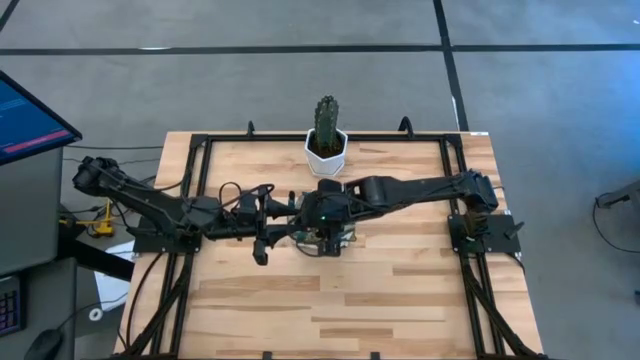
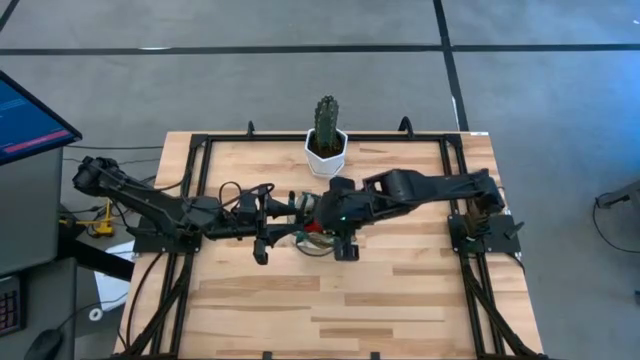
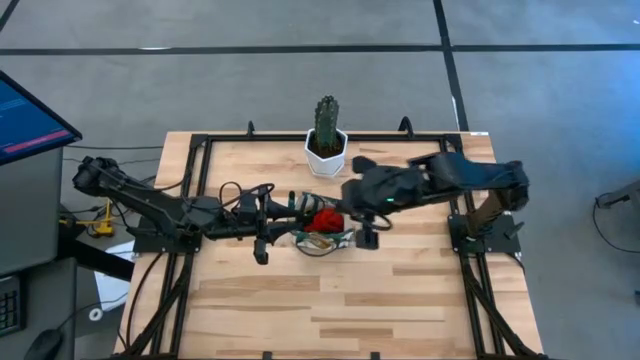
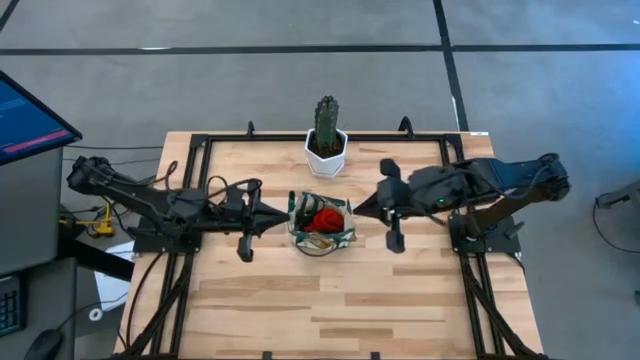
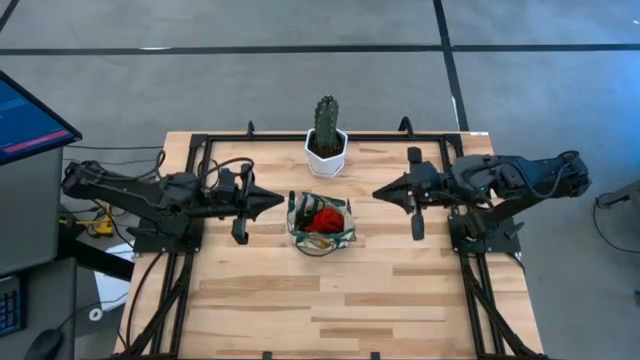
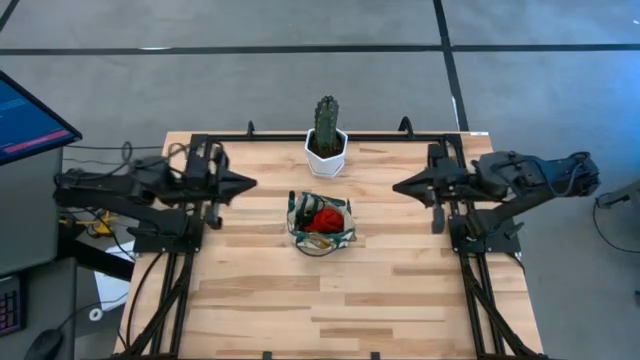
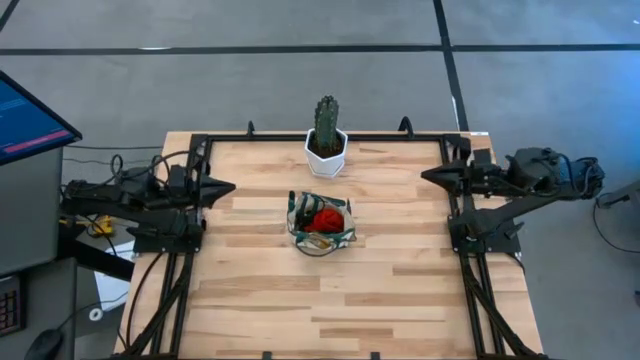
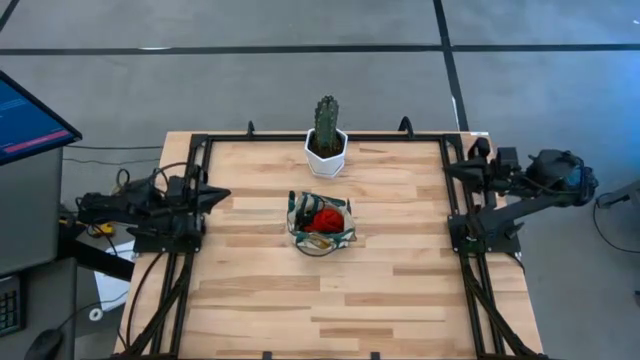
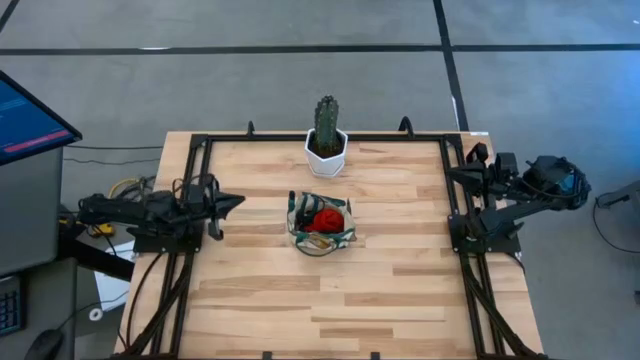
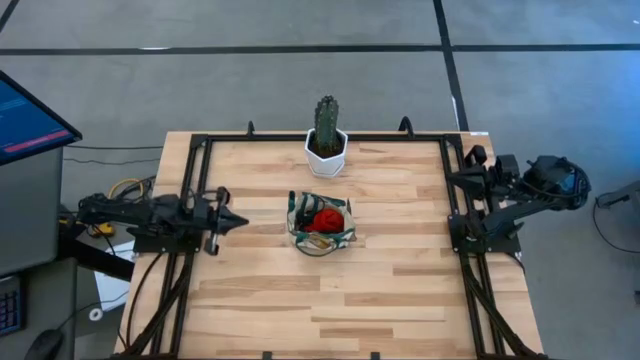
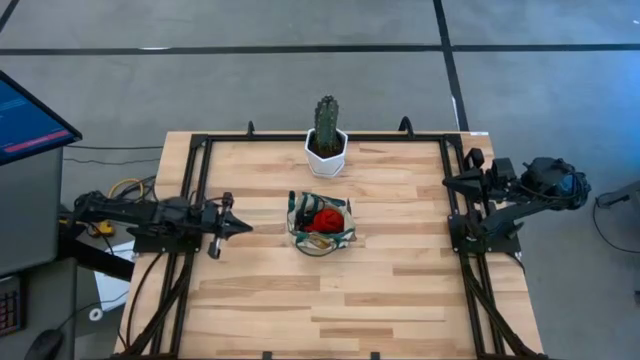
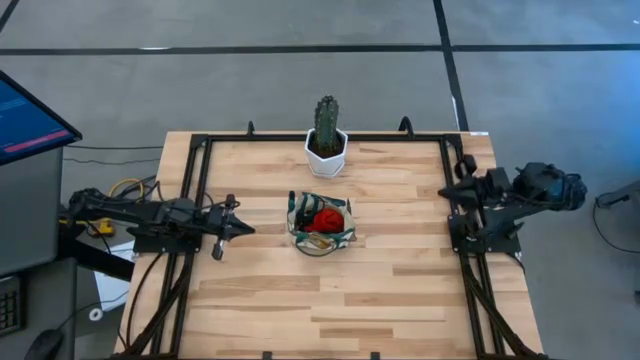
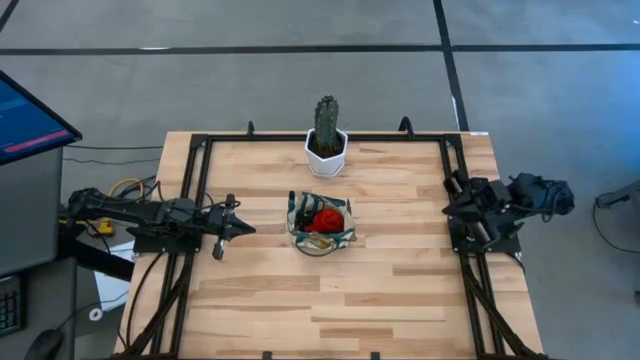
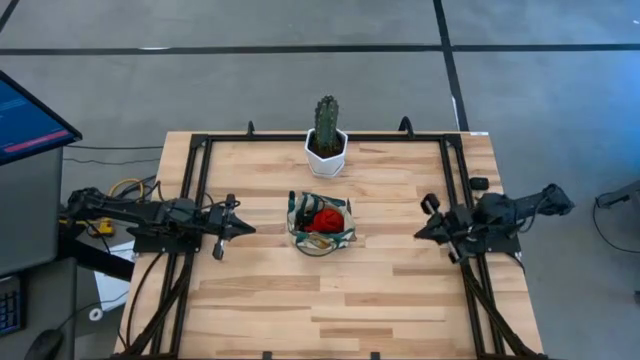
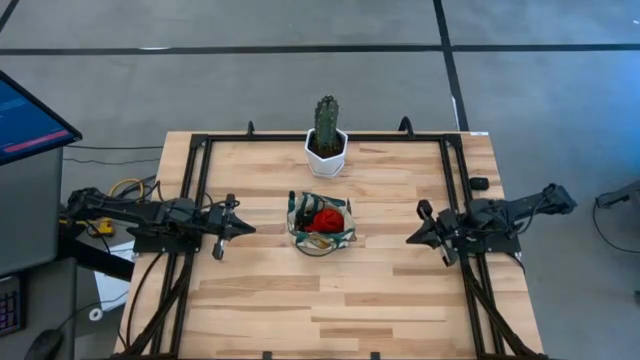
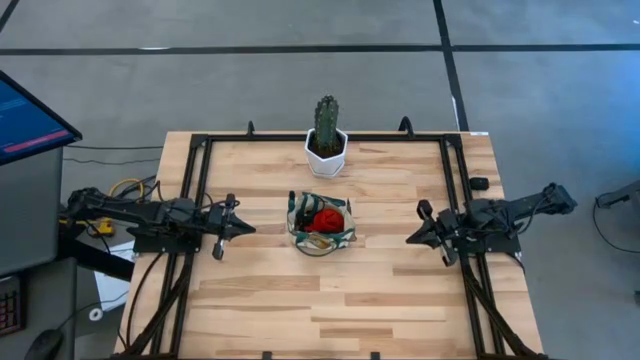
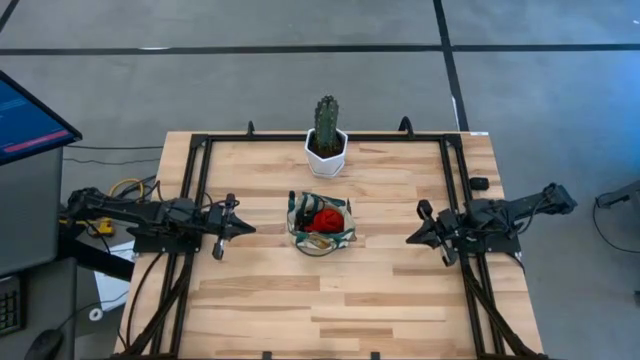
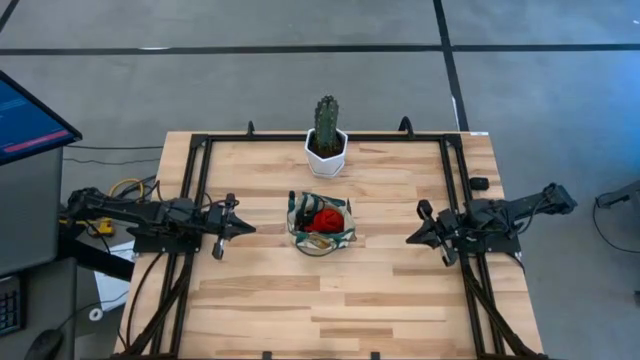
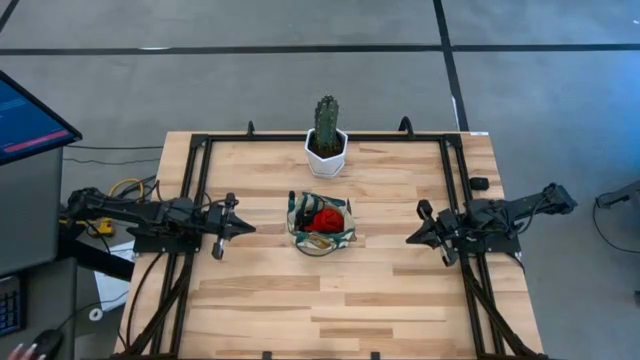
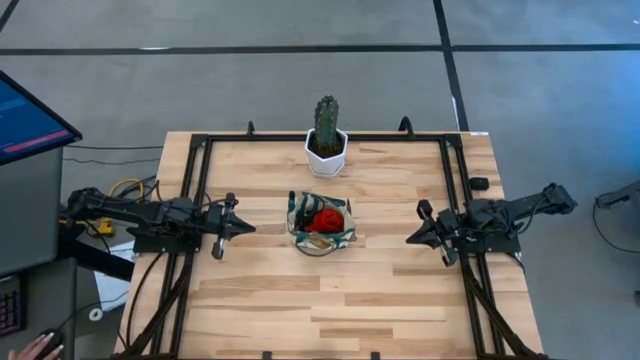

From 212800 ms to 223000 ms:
Task: Pick & Place Garden tools in Gardening bag
Return to Home Position

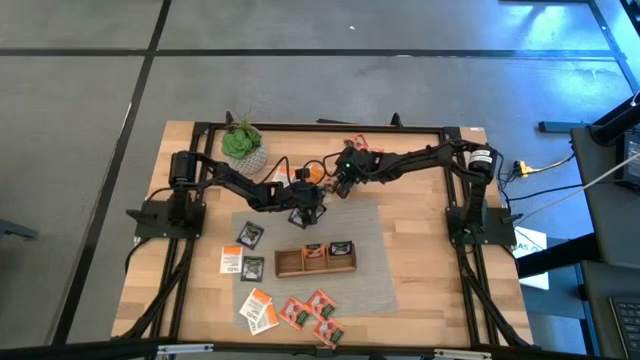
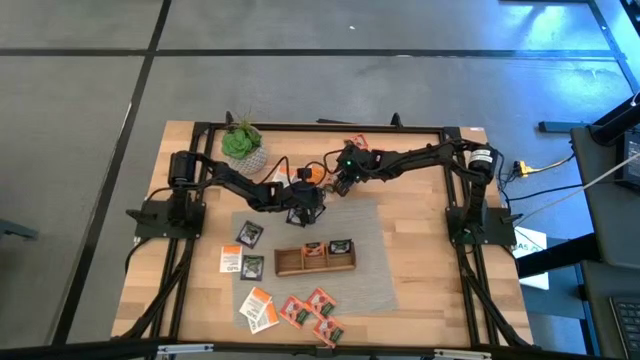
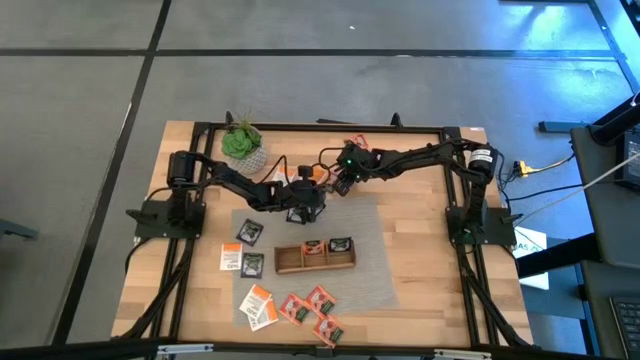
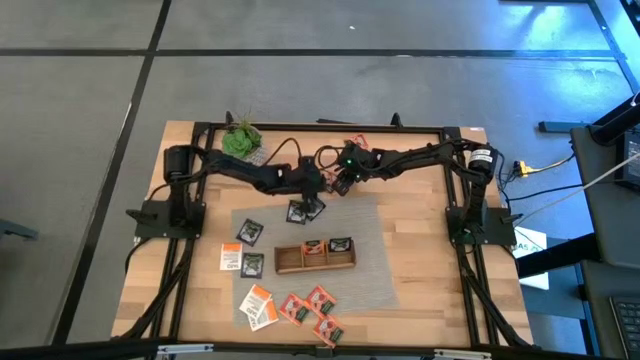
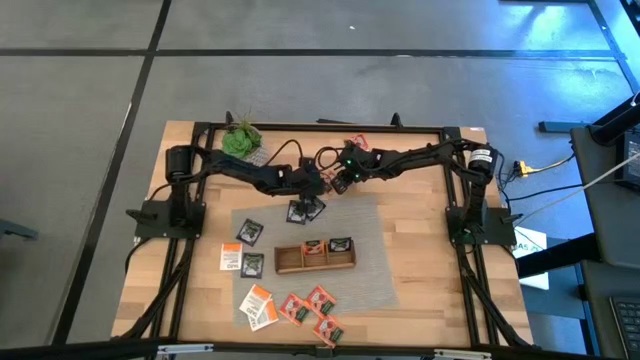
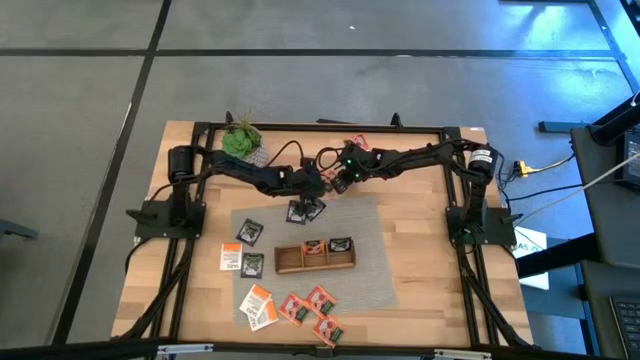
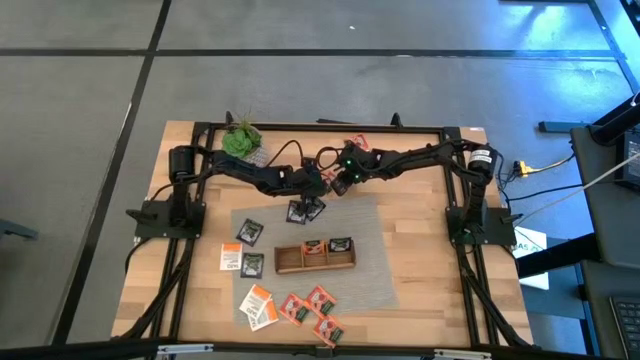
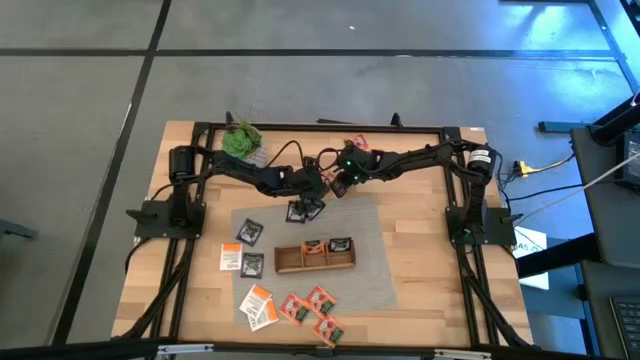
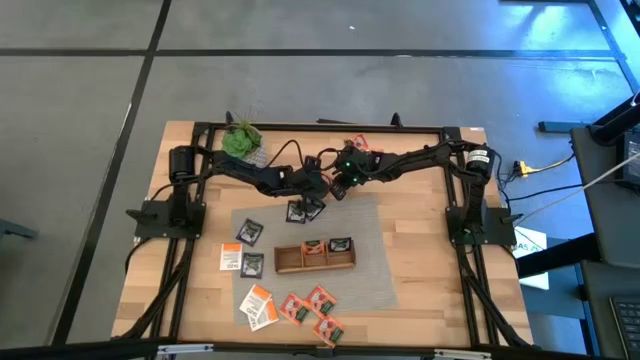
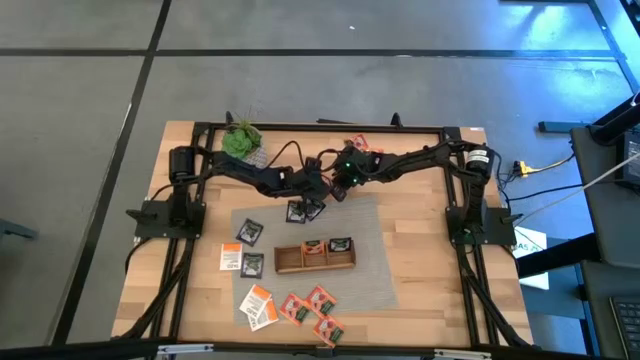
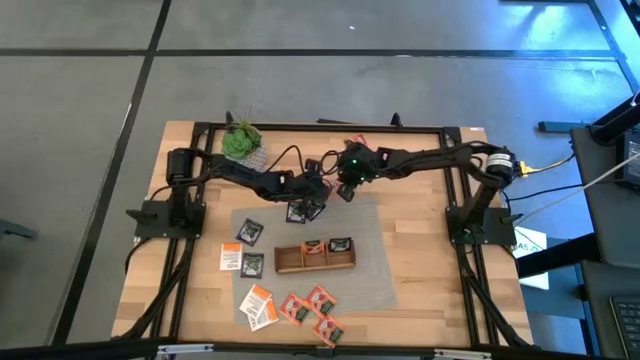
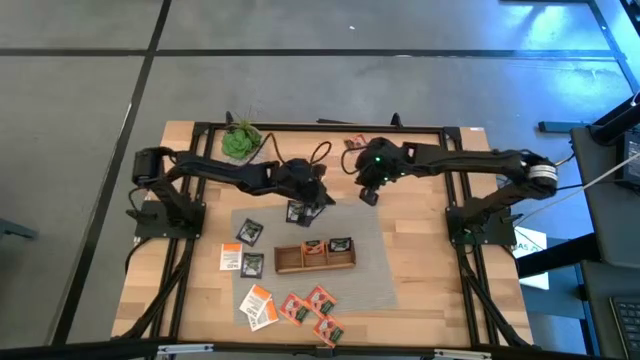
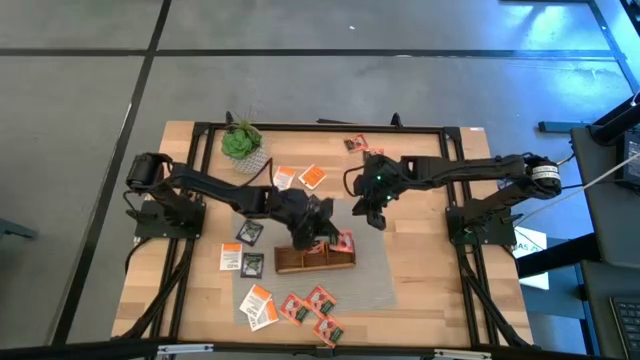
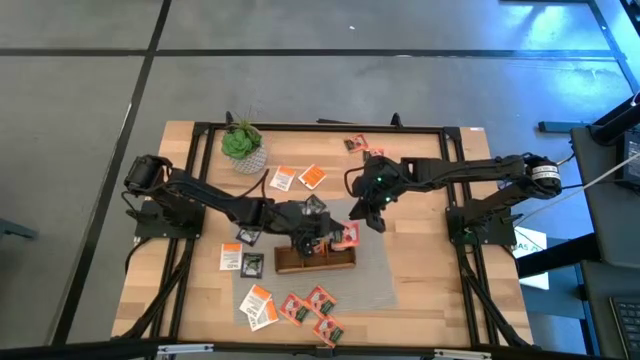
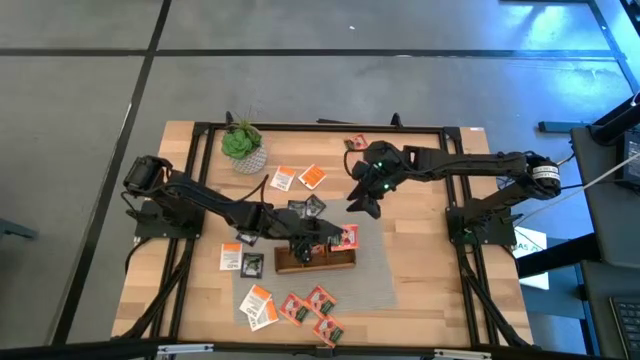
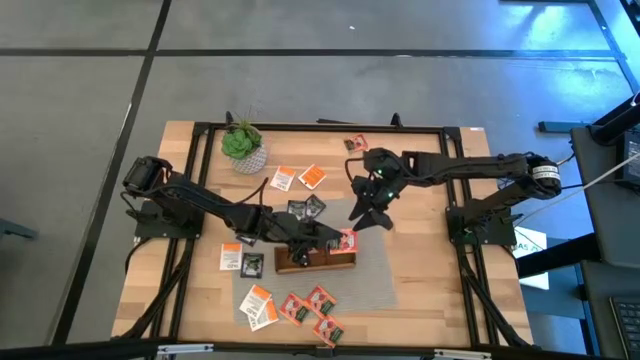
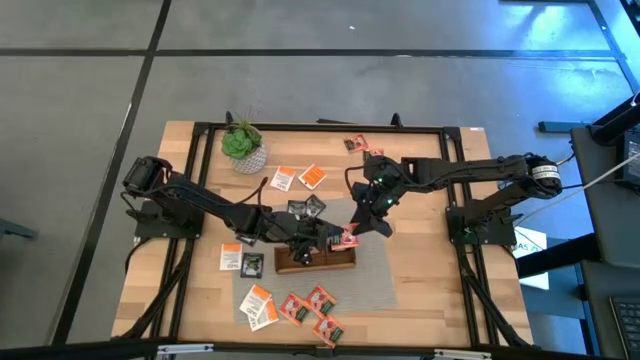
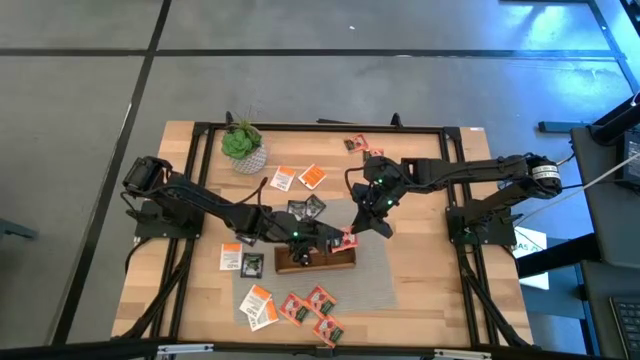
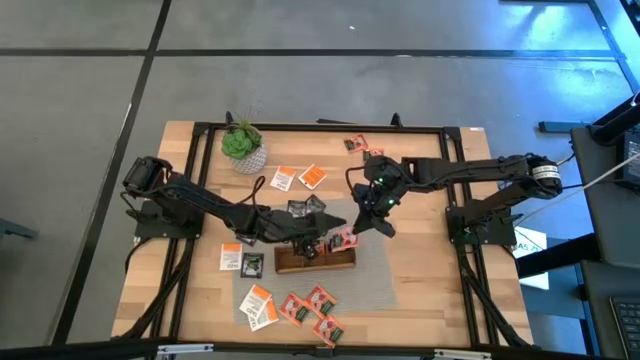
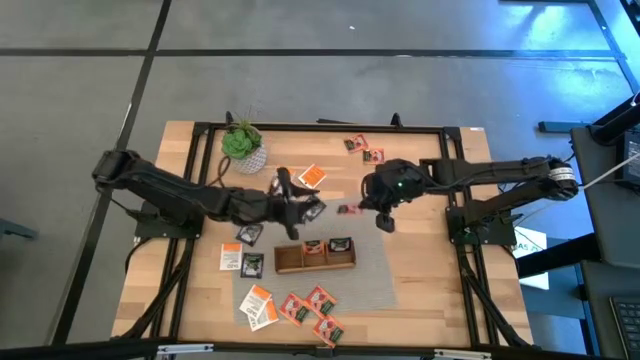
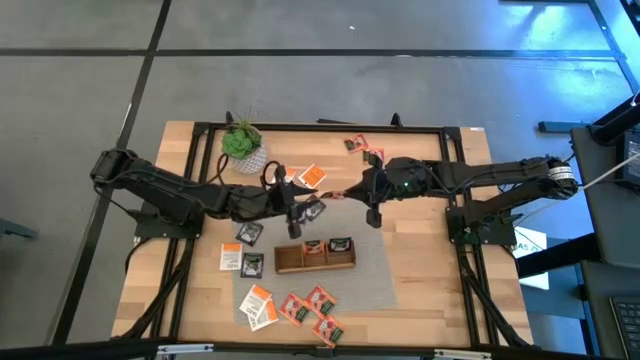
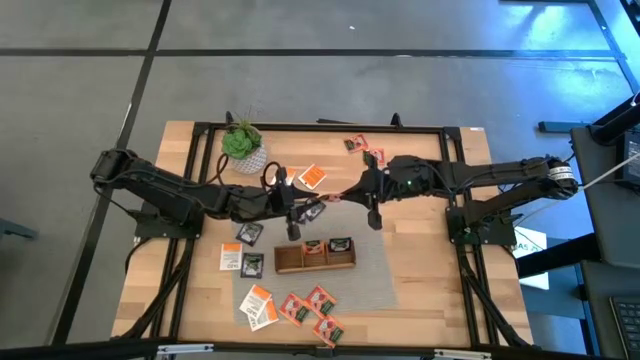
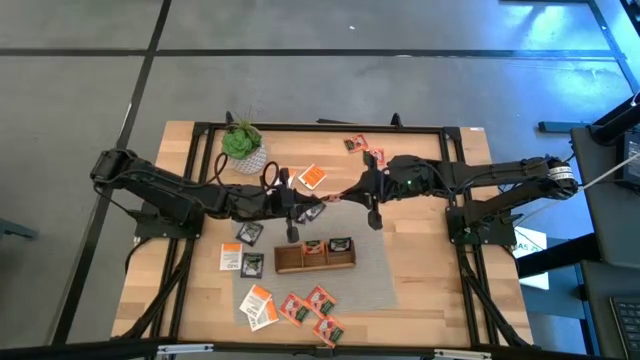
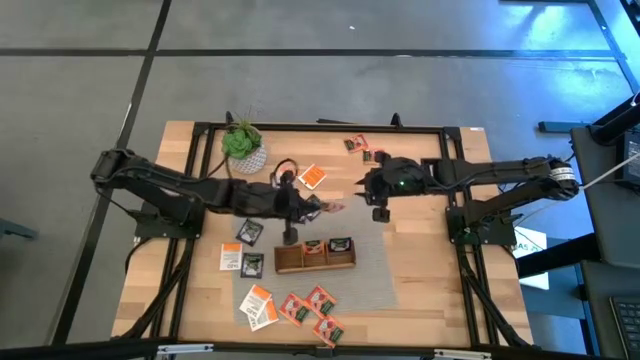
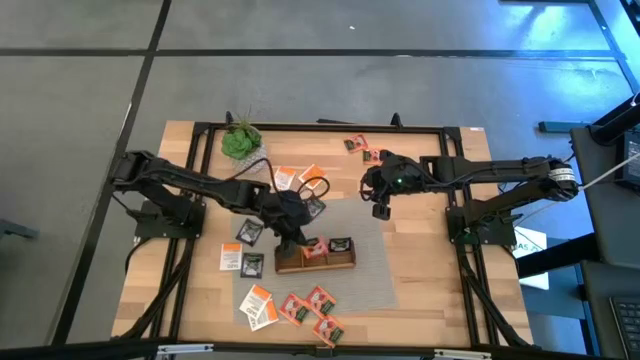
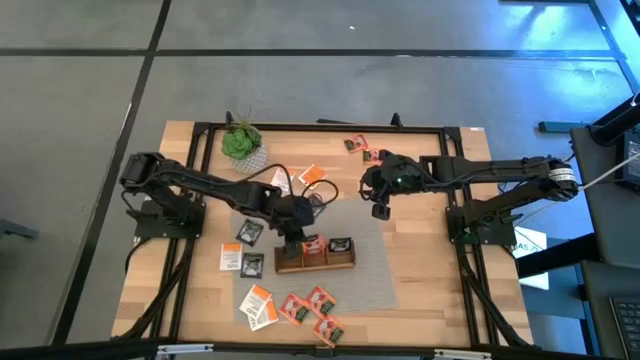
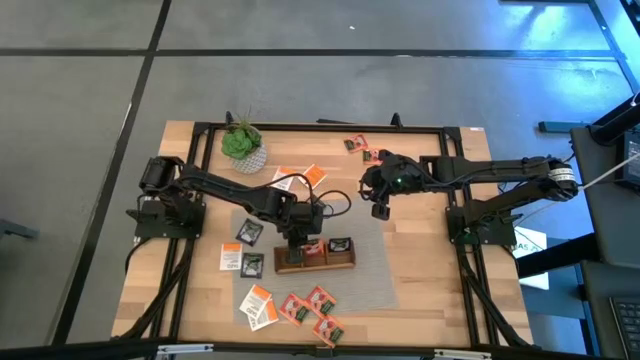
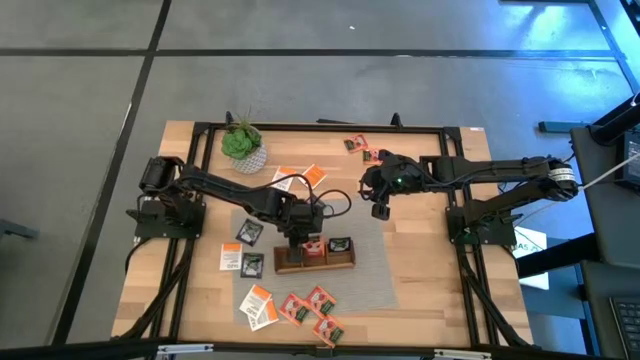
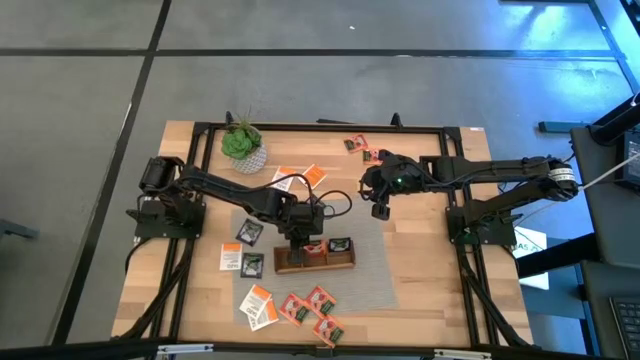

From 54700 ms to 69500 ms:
Task: Pick & Place Tea
Put the orange tea bag into the middle section of the wooden organizer
